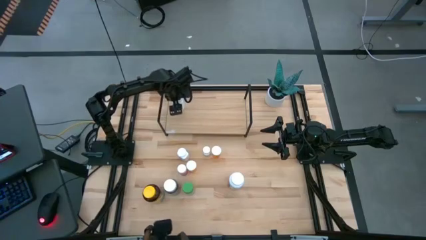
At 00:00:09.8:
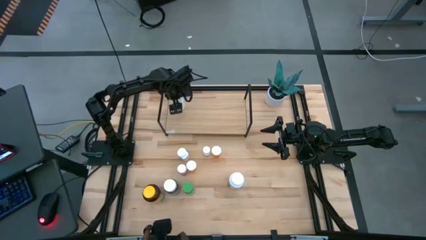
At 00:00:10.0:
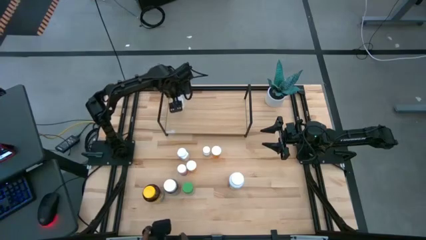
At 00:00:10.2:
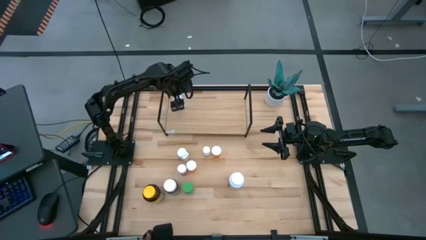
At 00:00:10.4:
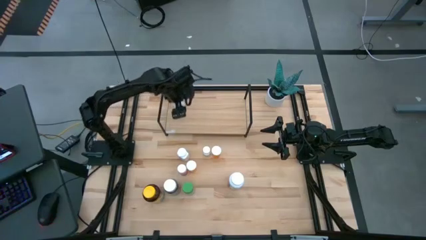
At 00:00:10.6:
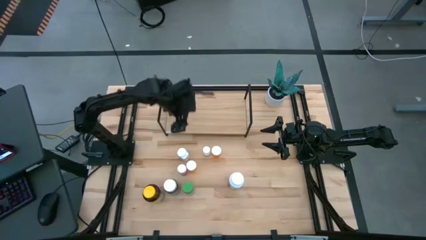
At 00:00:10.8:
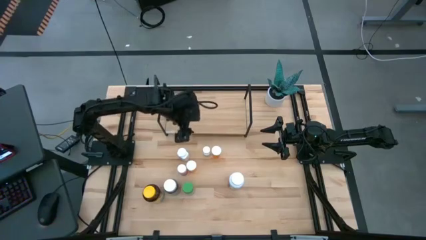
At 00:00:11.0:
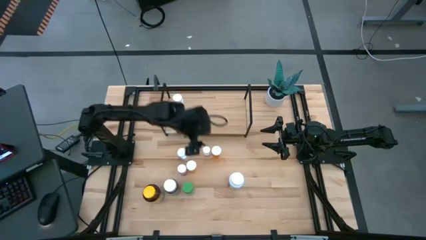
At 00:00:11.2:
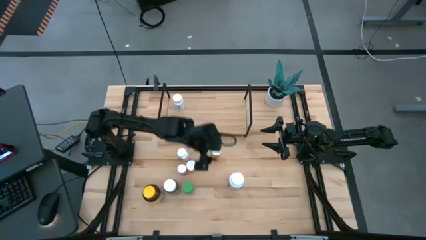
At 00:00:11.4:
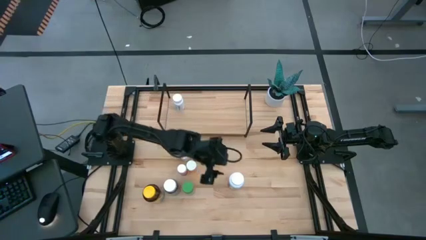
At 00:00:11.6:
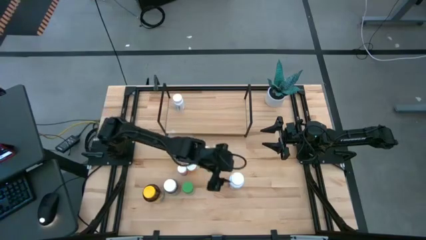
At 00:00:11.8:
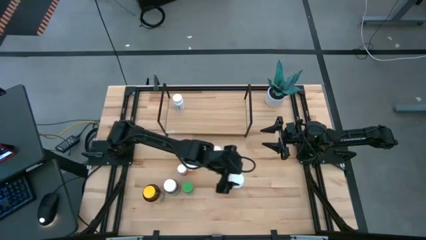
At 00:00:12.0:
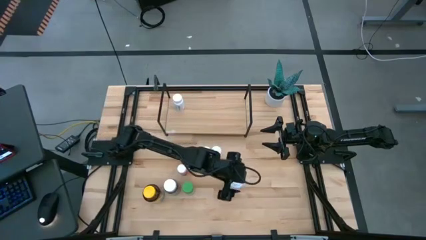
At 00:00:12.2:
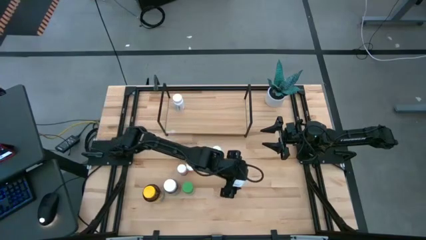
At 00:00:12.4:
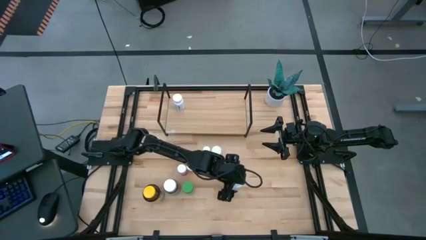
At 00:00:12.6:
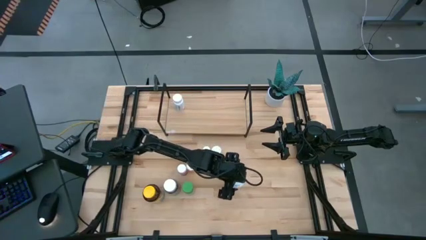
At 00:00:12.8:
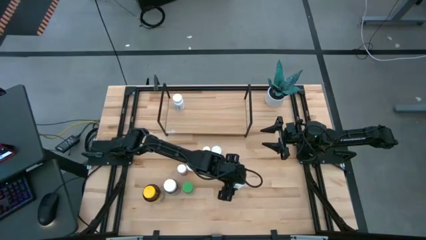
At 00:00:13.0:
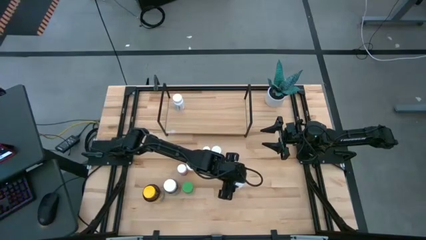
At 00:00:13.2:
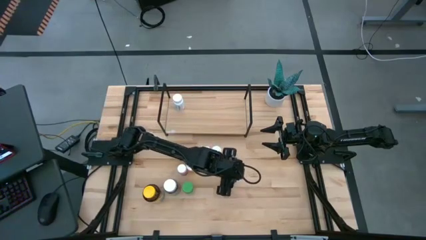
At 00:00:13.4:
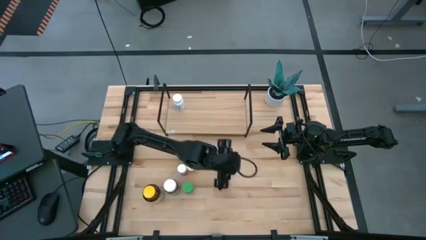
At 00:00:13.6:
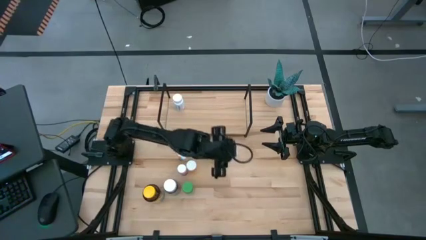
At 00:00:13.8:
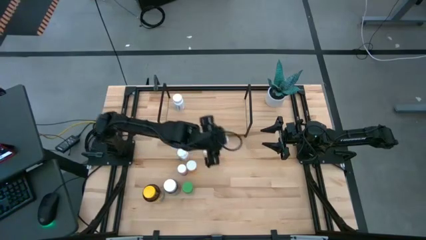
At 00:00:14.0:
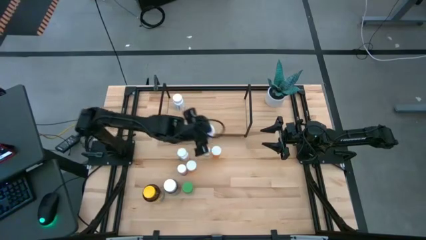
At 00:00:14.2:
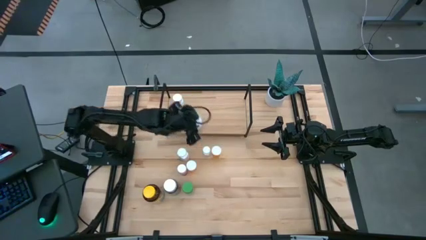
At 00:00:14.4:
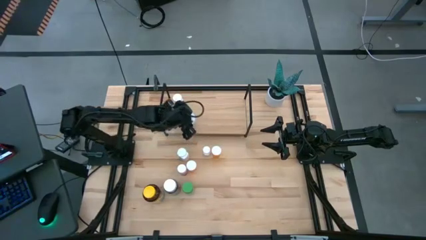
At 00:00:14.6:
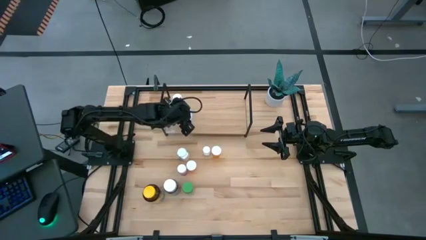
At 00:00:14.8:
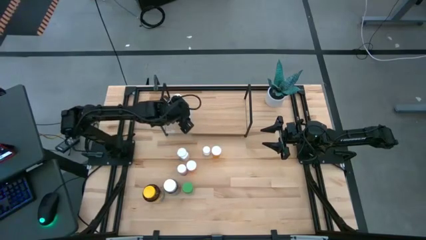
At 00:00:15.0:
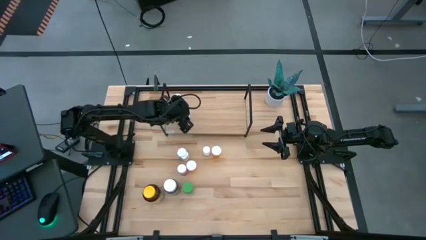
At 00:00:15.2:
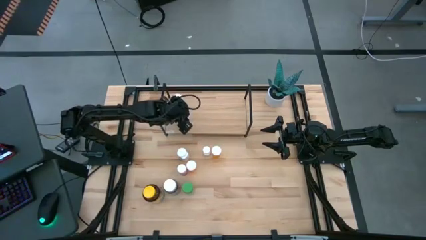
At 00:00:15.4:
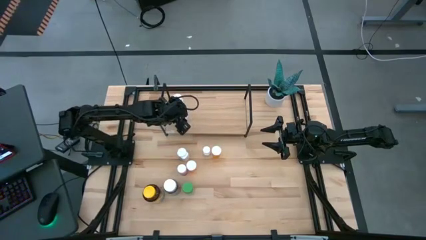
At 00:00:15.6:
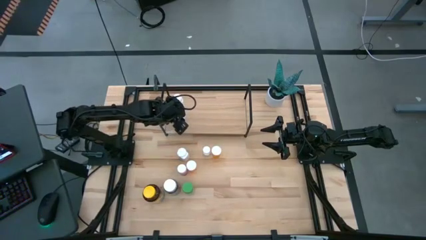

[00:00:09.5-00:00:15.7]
Task: Pick and place medicine bottles onto shelf by color
Put the big white bottle on the shelf

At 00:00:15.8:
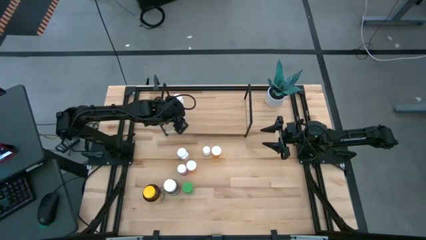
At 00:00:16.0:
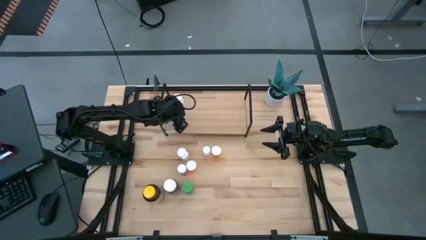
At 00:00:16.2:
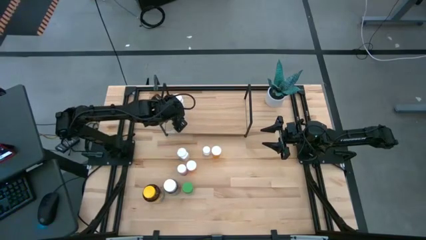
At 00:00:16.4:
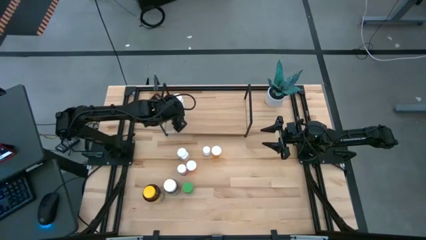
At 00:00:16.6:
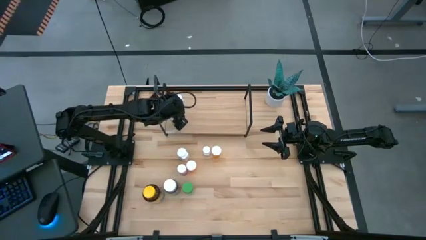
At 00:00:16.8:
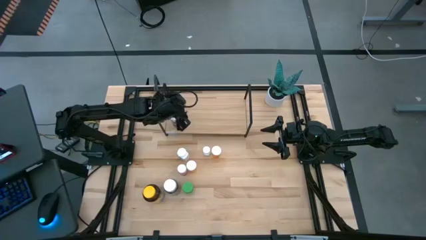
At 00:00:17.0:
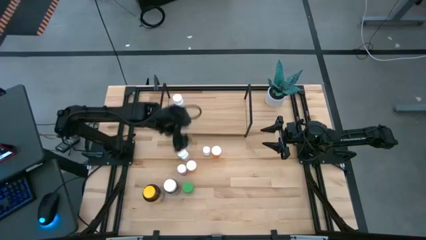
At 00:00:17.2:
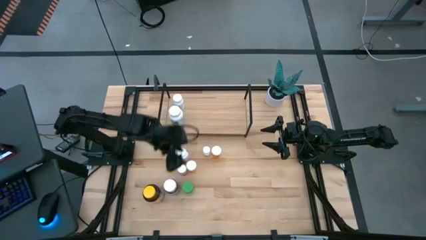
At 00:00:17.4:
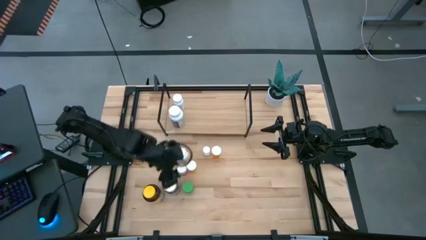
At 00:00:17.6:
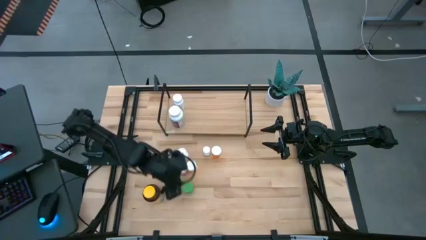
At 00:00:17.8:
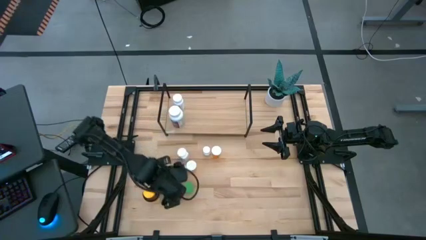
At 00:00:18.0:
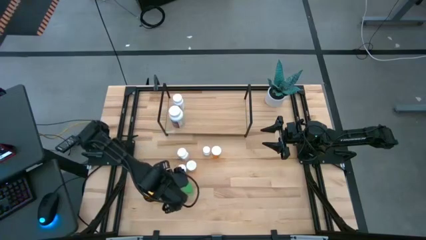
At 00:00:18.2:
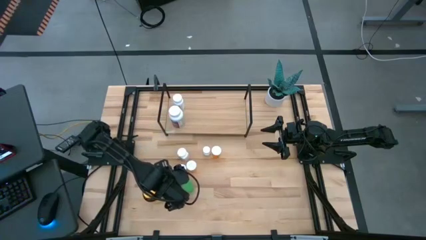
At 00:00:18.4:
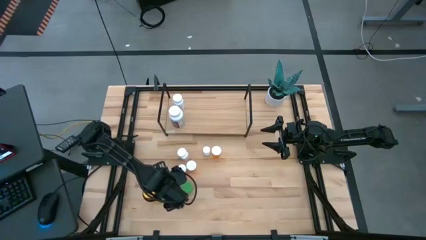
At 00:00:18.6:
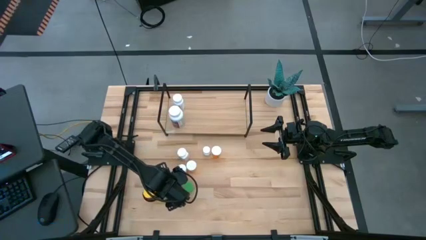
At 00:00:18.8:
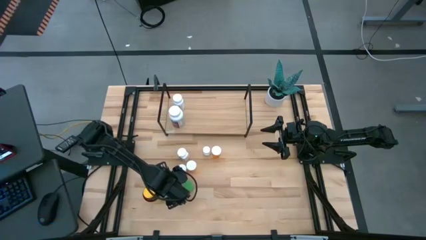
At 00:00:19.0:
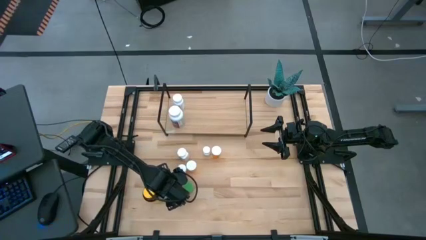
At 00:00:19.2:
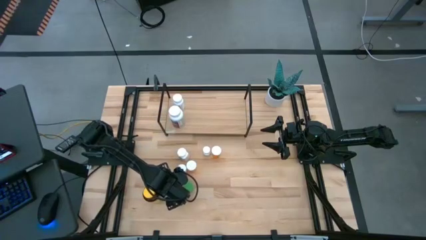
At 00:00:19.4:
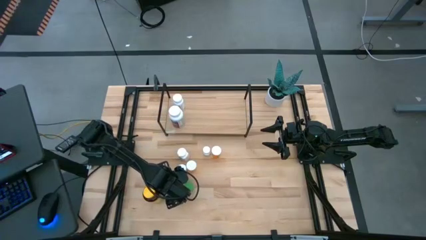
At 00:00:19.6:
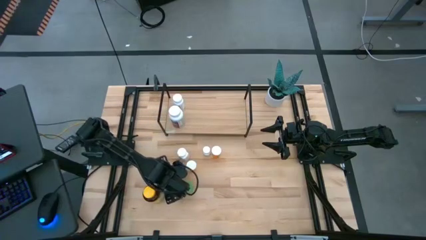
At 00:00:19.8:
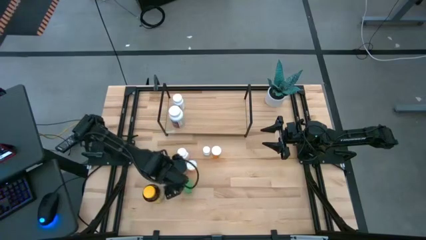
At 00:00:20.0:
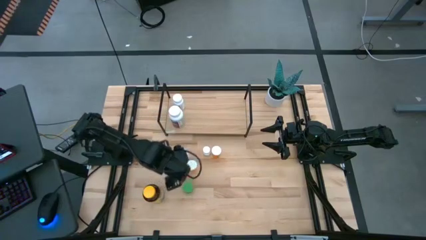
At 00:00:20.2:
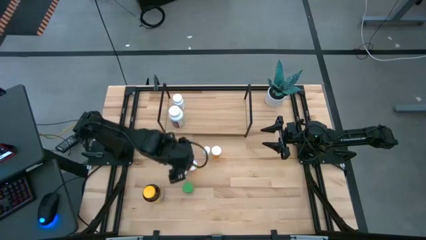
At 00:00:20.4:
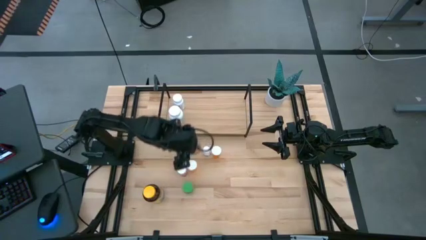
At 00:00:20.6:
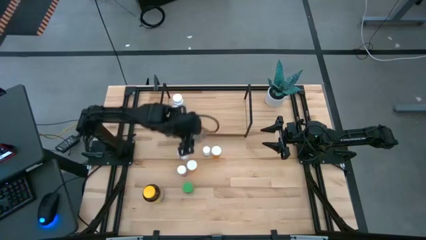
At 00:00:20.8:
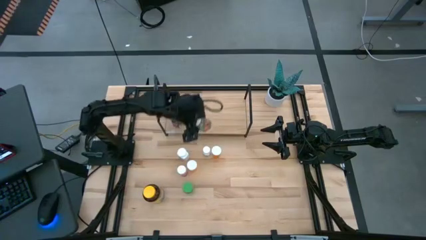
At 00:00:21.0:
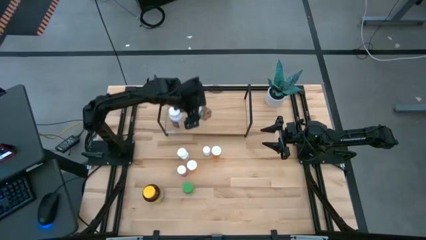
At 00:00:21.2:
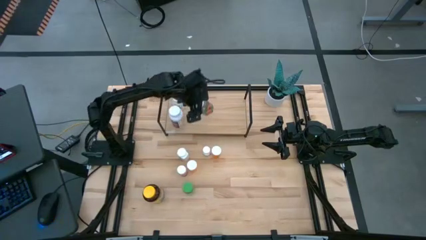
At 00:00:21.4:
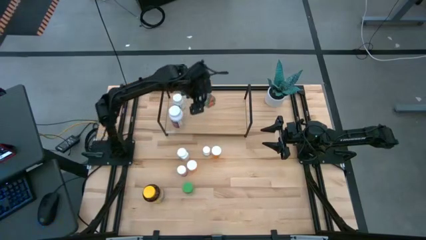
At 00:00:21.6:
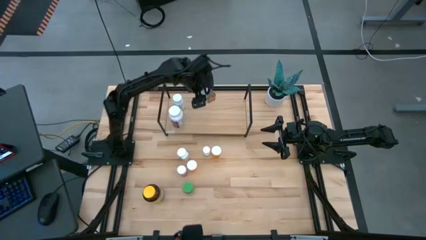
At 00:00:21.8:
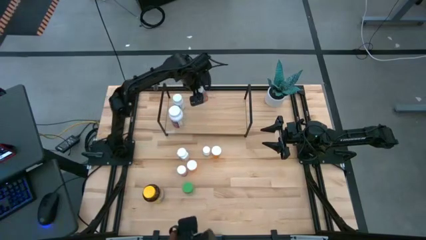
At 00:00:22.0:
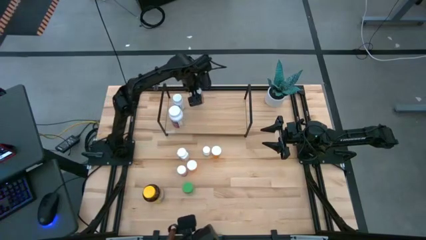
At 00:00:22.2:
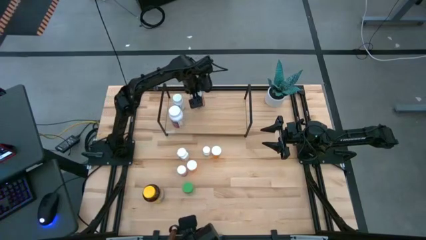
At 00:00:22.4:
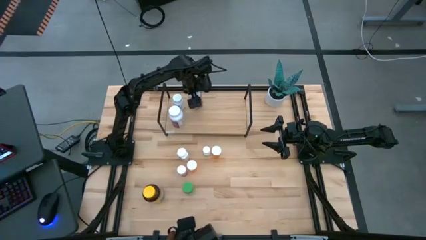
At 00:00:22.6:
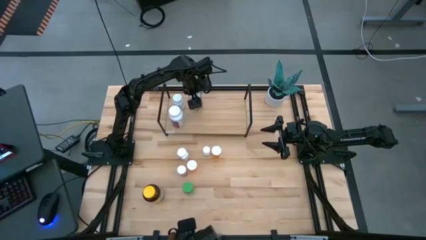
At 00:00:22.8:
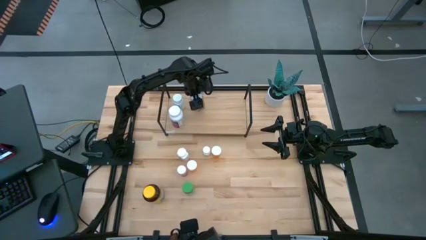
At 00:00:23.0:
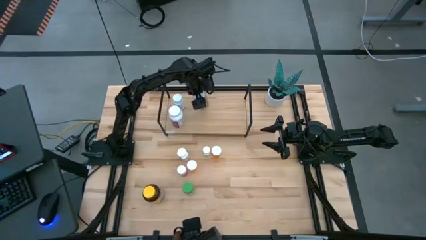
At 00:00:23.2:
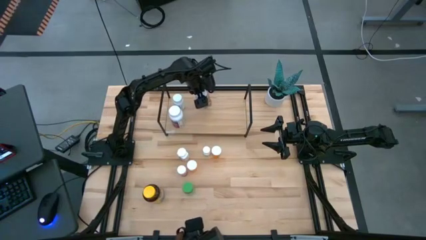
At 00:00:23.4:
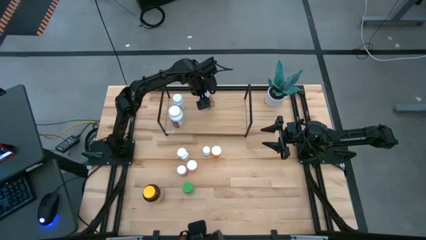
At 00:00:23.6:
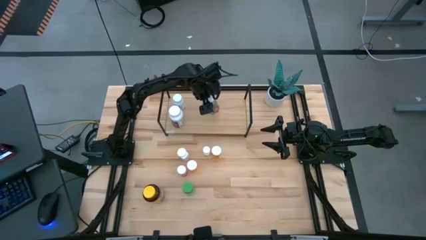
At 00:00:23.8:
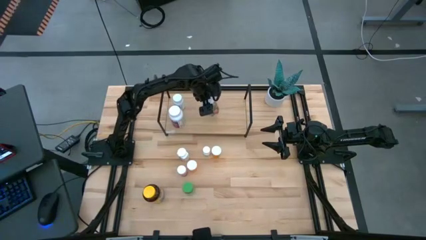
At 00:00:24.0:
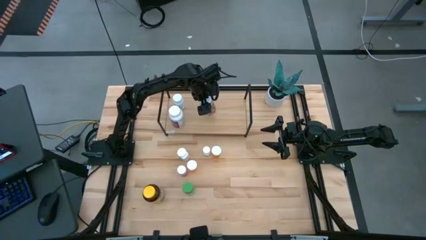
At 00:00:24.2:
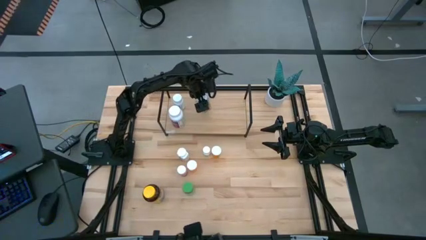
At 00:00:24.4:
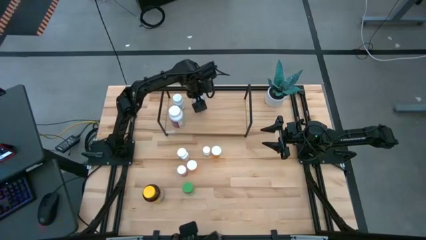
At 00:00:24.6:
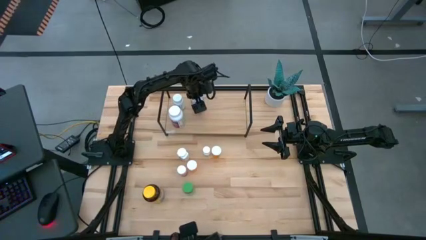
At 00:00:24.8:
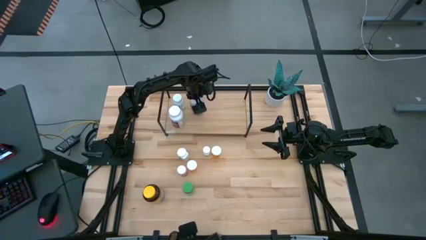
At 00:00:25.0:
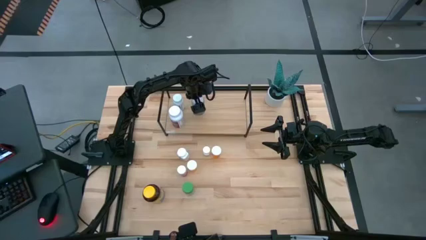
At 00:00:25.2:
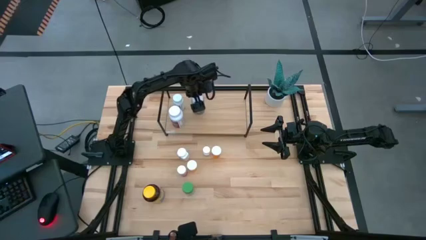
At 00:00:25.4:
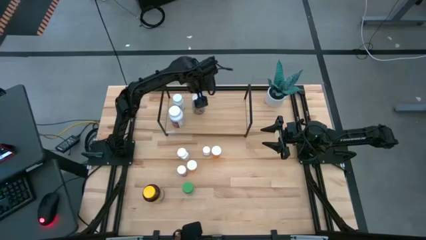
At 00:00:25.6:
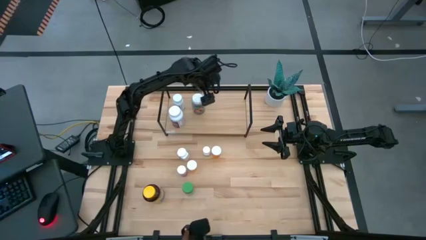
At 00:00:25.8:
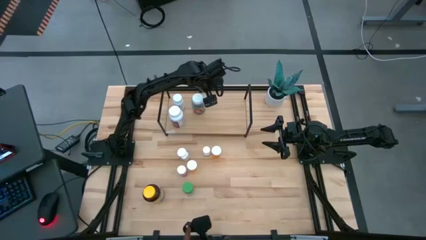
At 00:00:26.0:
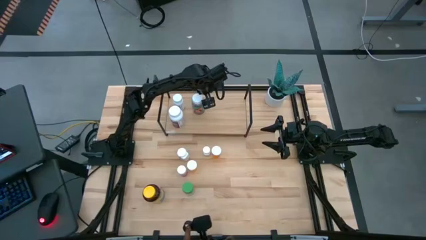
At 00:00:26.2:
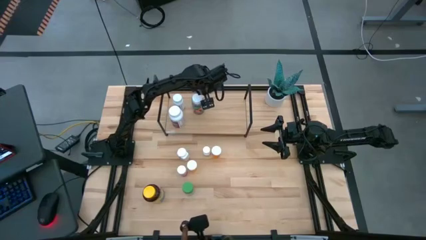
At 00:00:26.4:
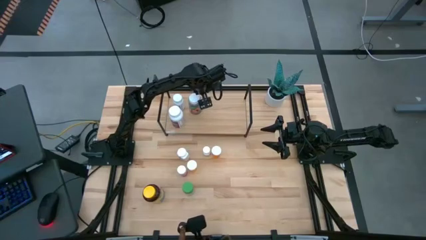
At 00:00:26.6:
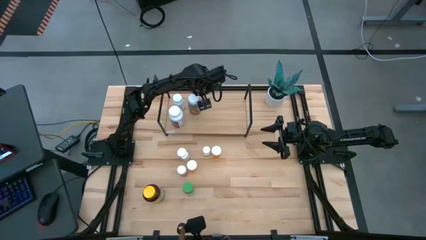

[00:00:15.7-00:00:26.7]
Put the green bottle on the shelf
